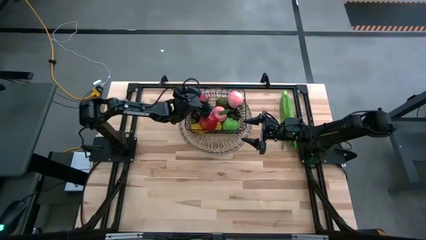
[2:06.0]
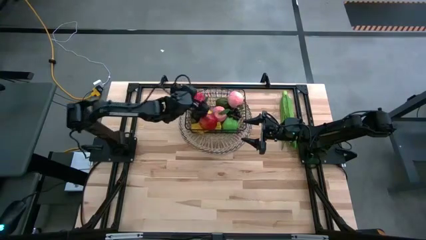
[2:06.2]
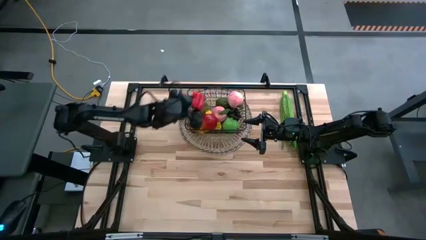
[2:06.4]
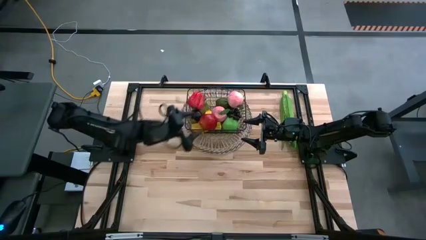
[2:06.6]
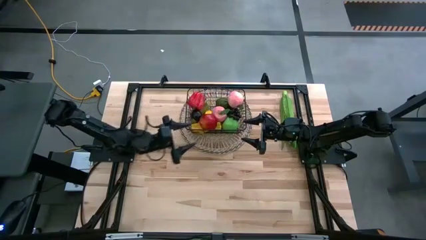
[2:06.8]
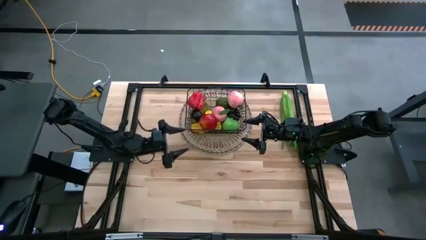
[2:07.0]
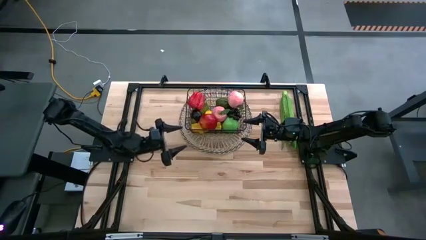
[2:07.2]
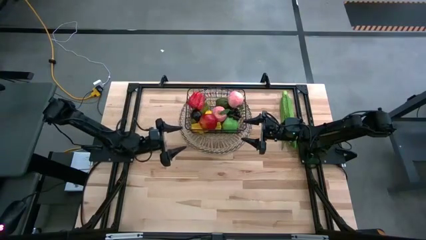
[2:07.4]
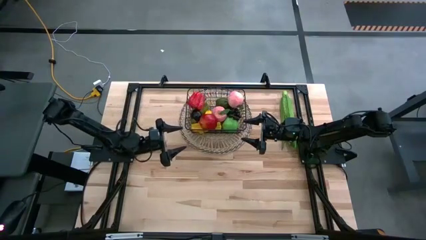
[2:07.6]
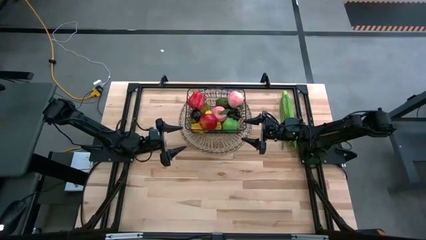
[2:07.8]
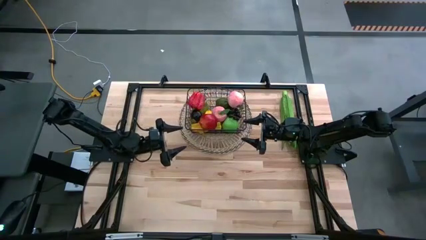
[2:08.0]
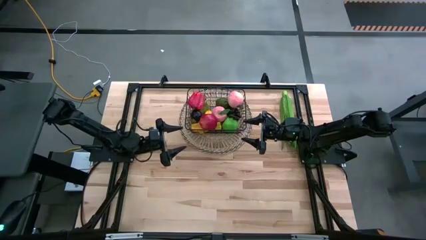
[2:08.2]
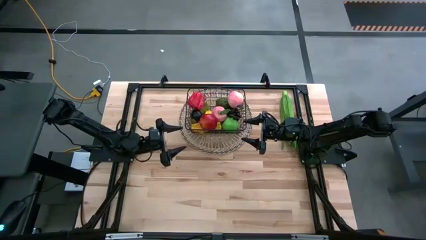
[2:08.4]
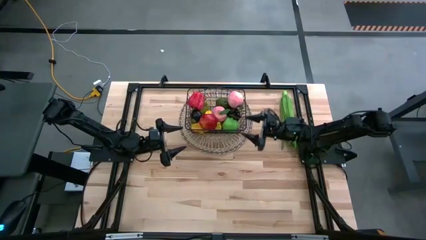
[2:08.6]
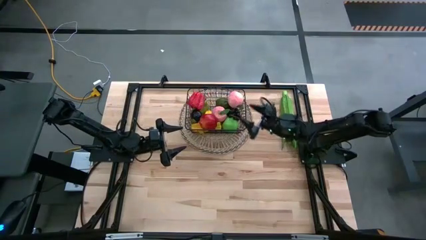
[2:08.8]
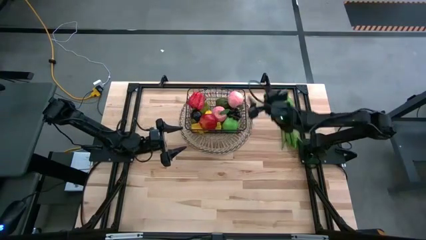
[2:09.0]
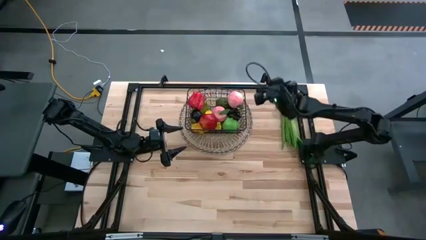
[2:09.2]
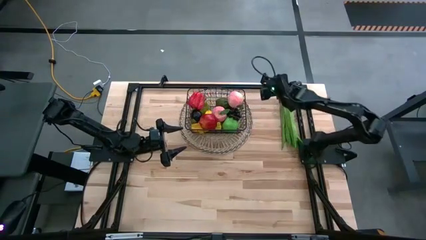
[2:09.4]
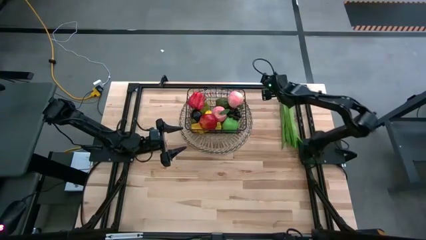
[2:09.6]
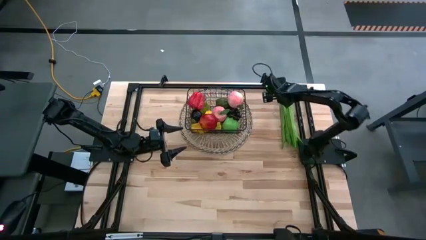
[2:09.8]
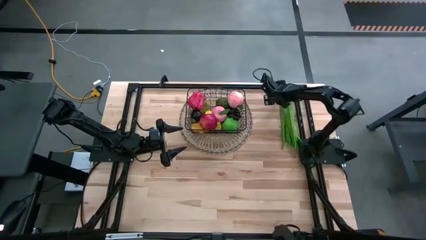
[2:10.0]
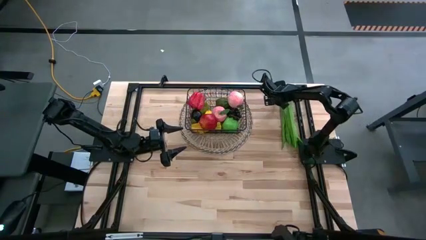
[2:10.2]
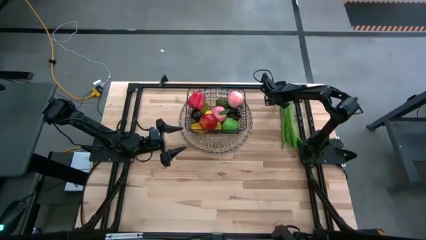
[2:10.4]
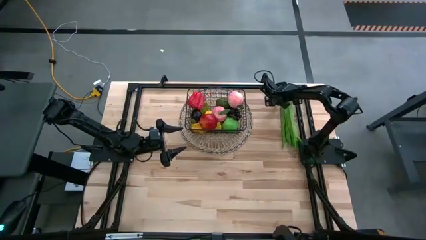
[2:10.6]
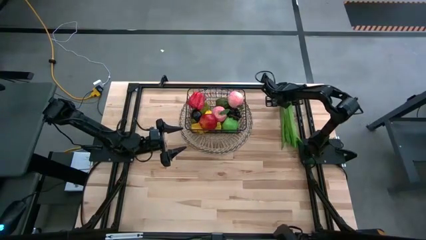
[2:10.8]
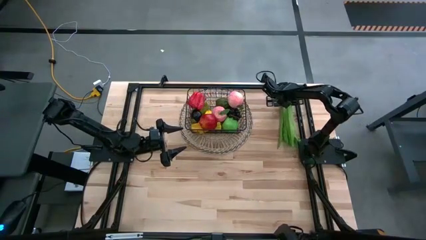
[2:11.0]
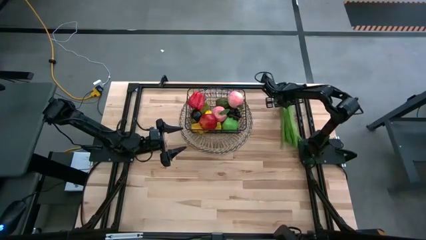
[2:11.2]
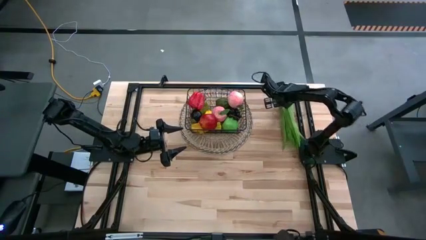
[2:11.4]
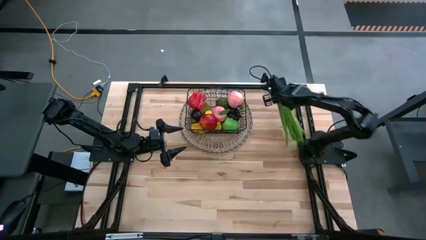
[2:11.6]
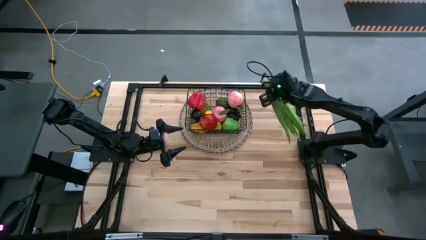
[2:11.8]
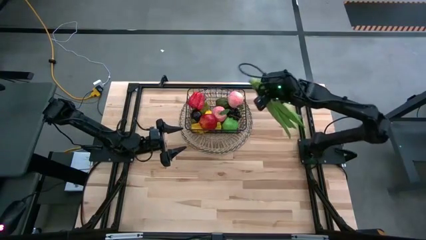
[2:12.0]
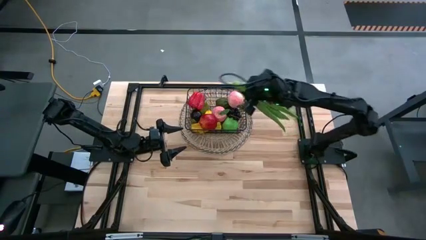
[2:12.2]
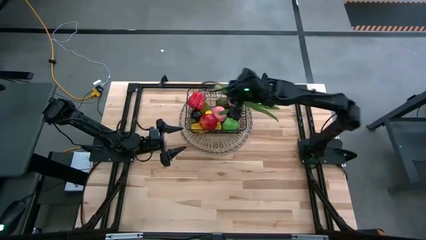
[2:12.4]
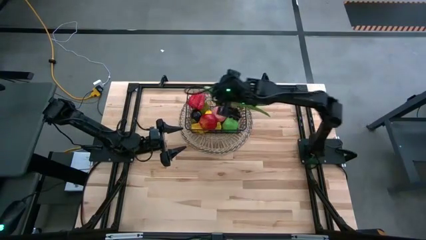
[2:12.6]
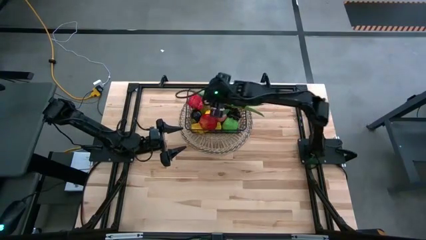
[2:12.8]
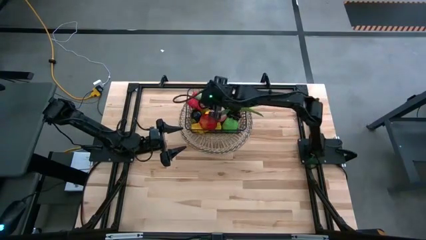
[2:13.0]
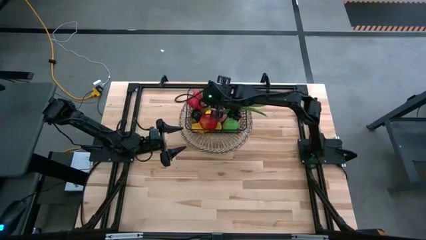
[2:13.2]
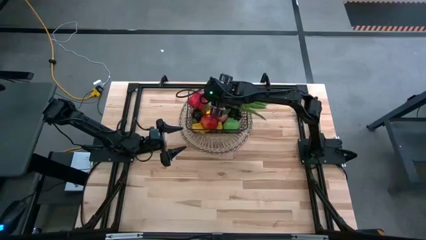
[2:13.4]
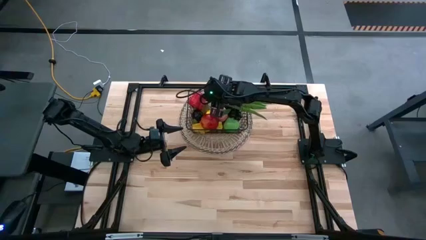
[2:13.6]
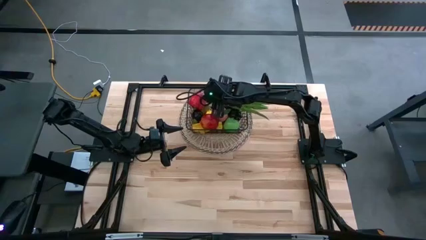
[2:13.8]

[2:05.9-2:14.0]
Task: Build produce basket
Put the leaf lettuce into the black wire basket

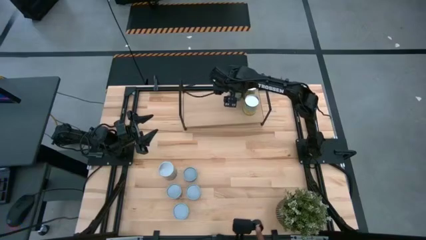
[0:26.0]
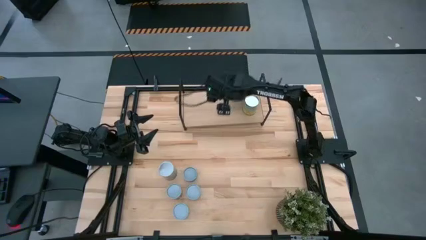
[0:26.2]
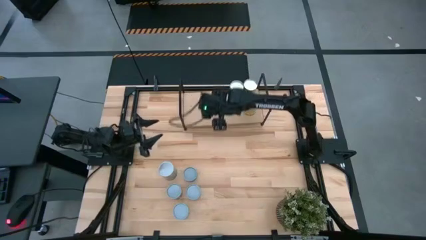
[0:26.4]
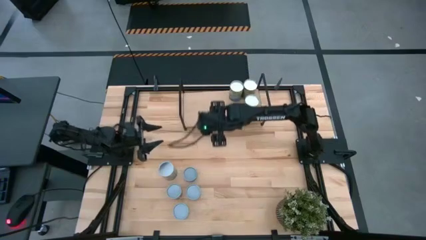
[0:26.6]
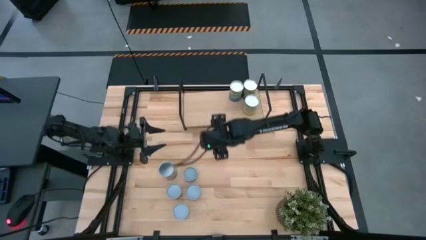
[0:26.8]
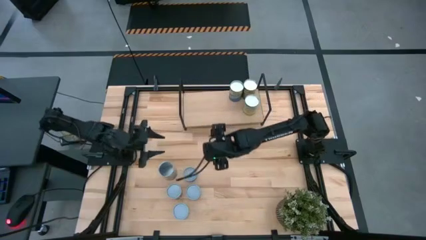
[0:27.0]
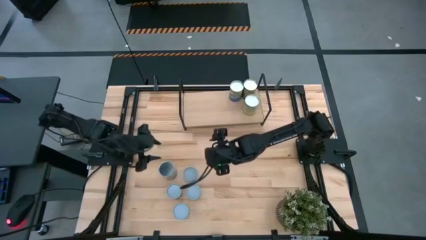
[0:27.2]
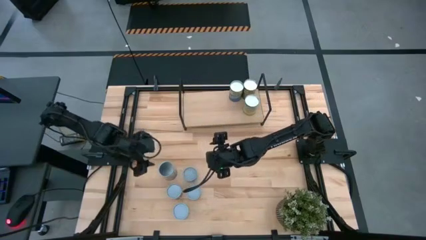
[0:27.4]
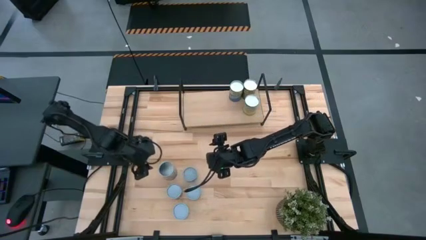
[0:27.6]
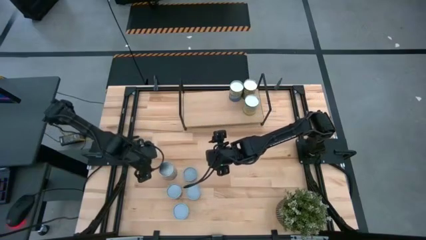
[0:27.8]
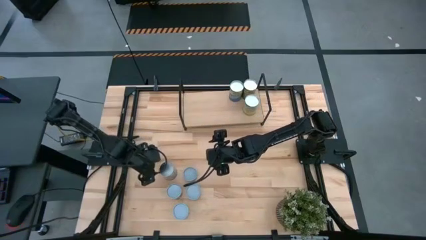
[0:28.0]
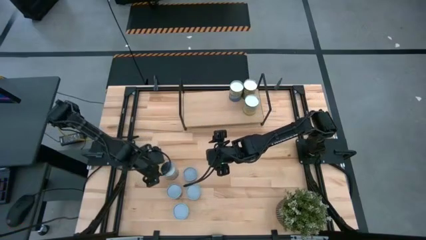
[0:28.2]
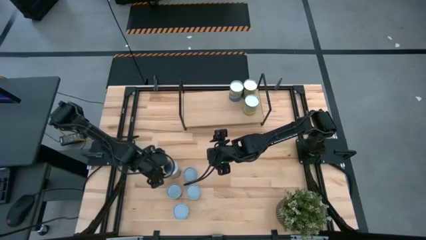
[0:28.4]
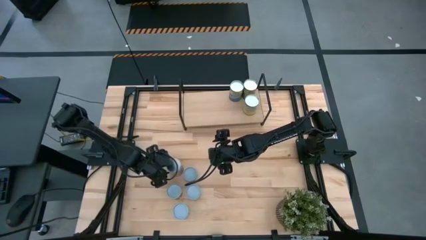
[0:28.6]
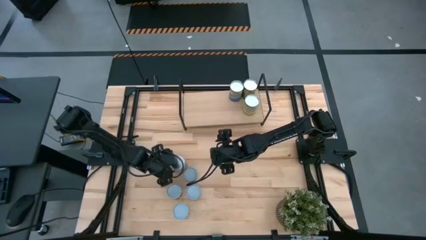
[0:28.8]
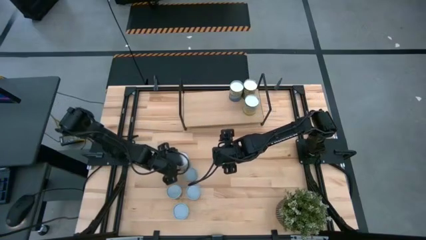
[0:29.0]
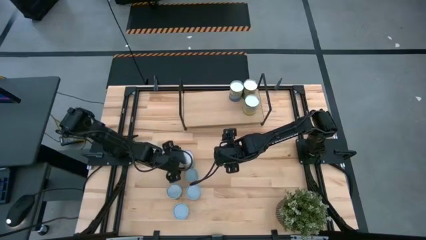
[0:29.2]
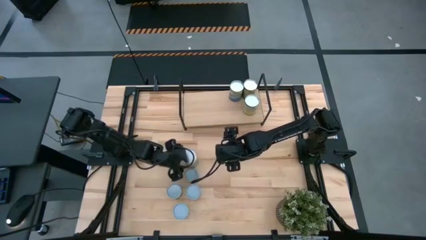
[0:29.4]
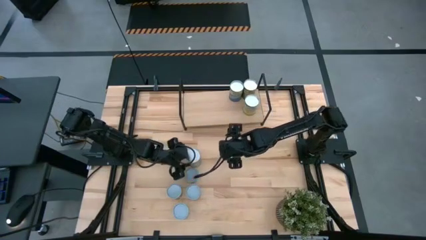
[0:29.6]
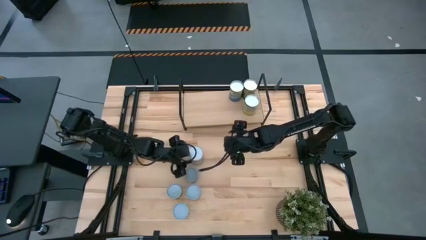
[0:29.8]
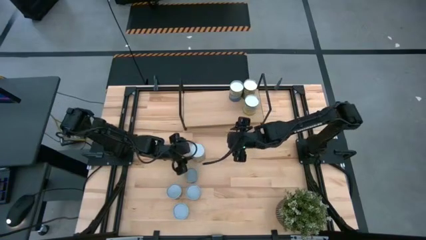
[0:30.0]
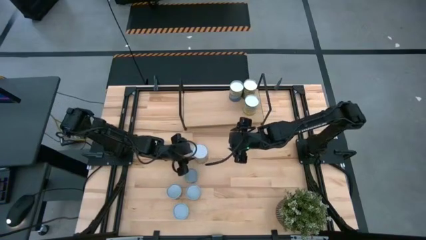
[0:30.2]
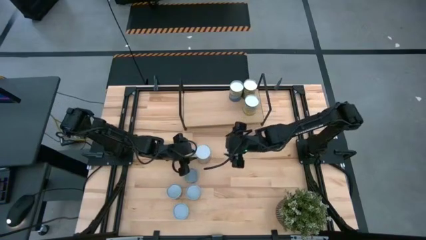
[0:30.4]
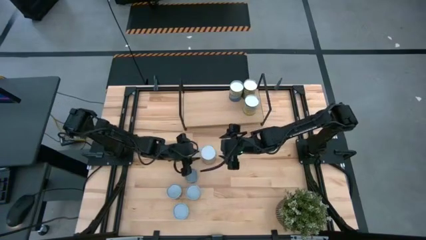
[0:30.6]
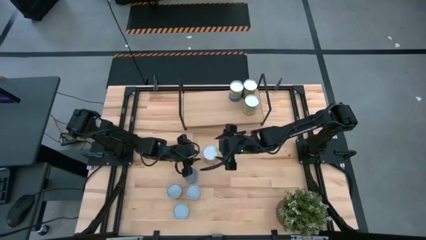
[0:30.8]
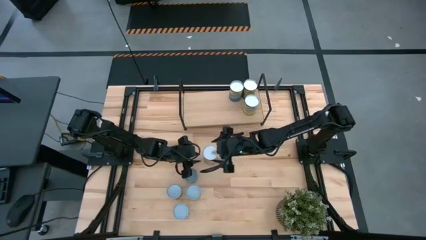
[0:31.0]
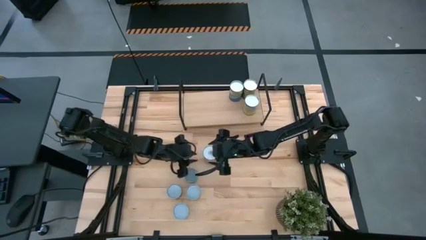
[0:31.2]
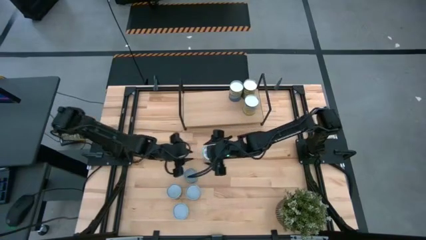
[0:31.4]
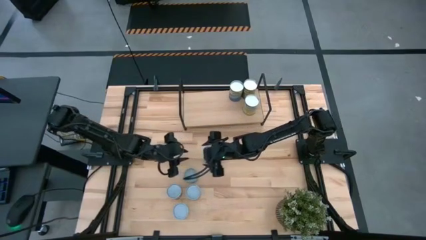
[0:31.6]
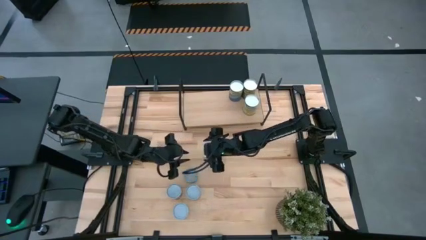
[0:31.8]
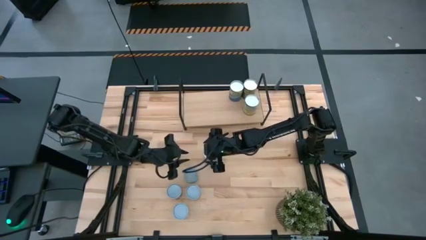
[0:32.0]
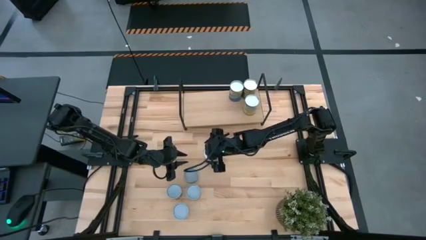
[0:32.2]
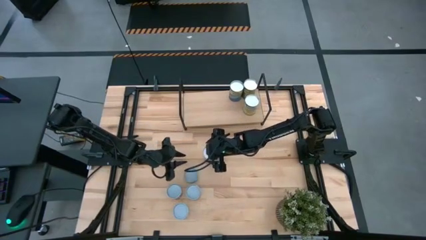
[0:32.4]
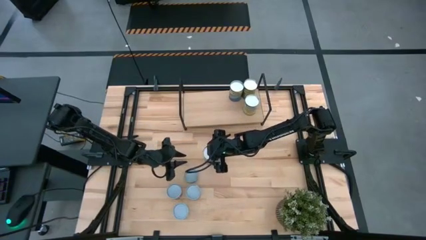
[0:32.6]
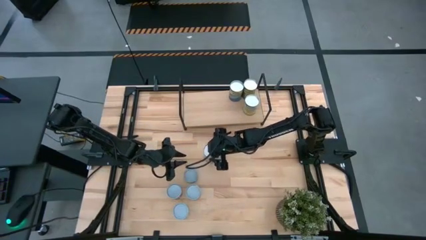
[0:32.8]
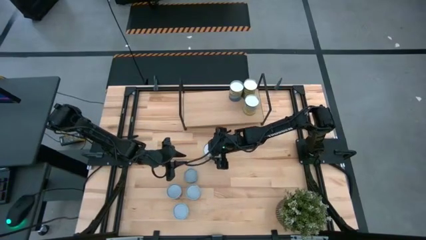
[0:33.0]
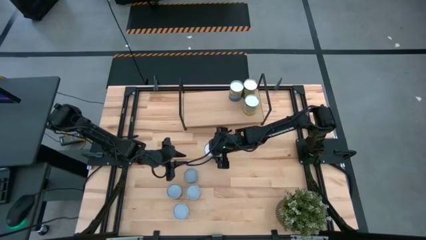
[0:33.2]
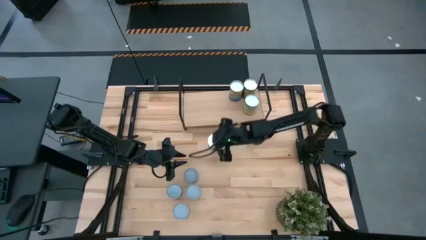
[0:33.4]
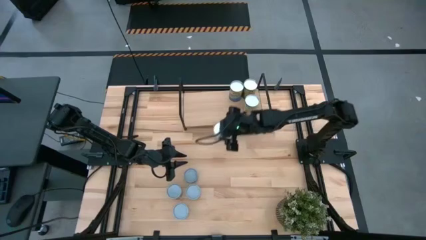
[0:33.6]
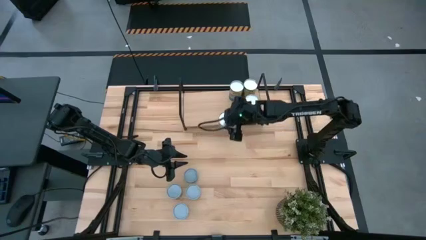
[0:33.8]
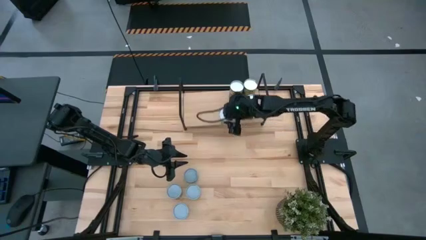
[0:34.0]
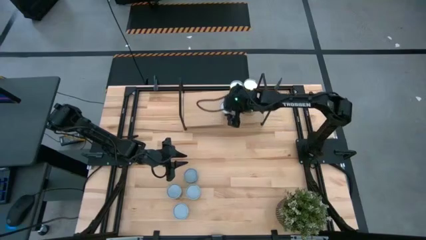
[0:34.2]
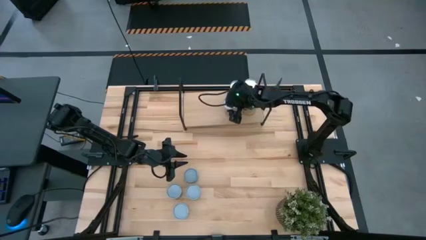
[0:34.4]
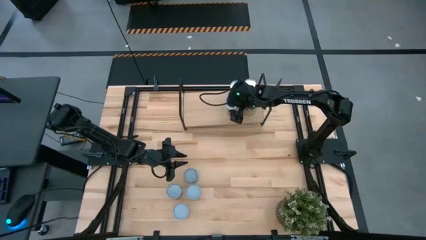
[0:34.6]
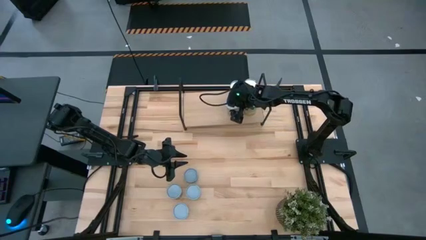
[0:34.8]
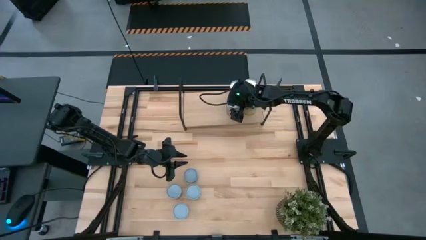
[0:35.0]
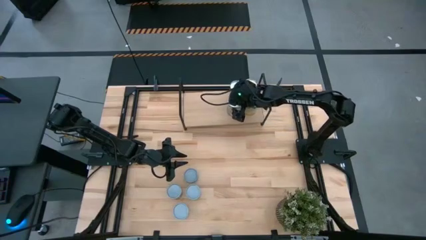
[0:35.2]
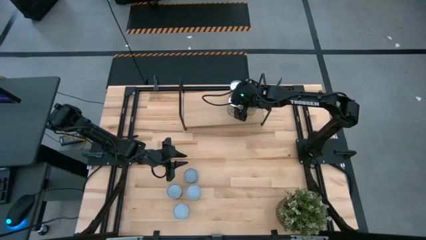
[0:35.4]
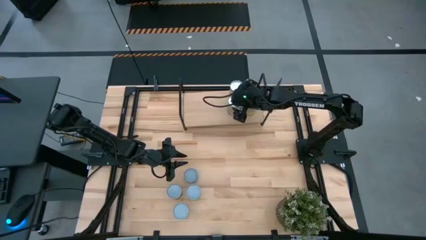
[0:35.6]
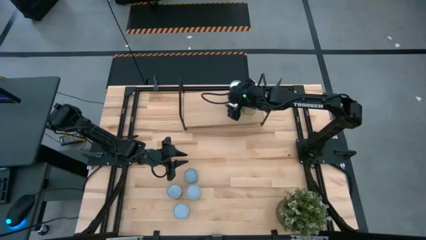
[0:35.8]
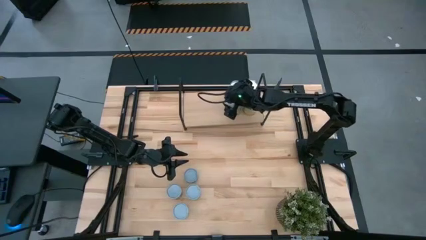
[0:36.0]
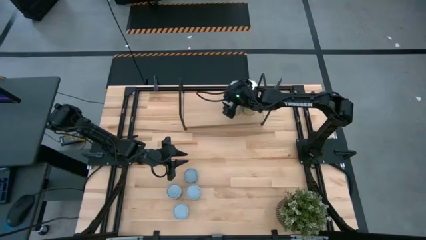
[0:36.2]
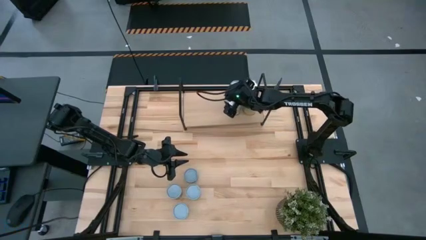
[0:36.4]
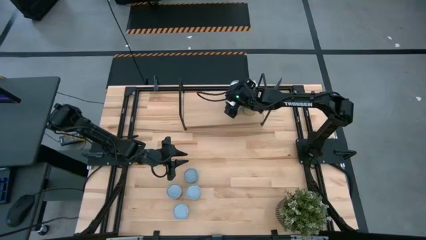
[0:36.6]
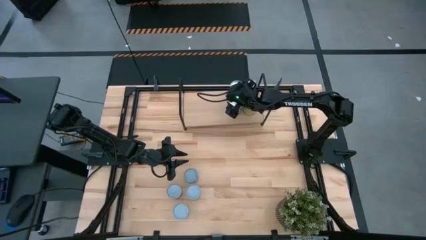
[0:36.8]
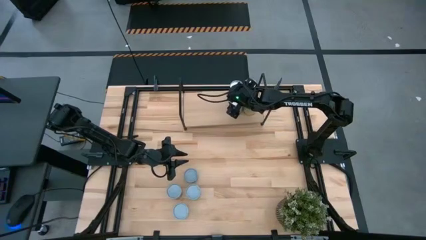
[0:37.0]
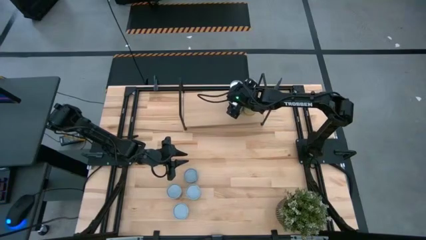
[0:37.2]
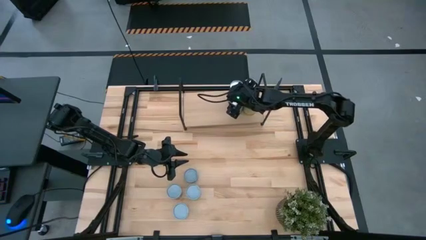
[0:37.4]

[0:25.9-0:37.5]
Task: Pick and place cans onto a shelf
Put the canned peaches on the shelf
